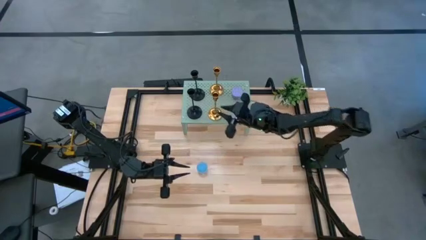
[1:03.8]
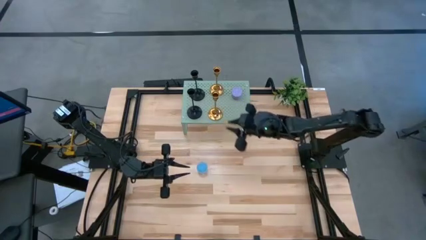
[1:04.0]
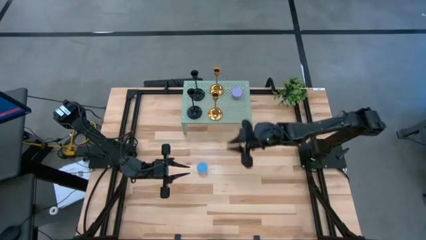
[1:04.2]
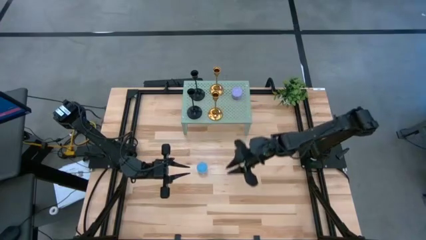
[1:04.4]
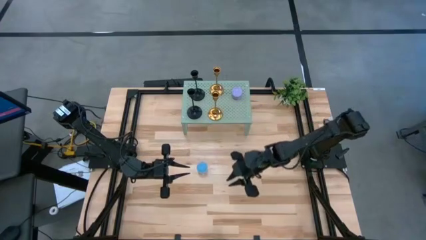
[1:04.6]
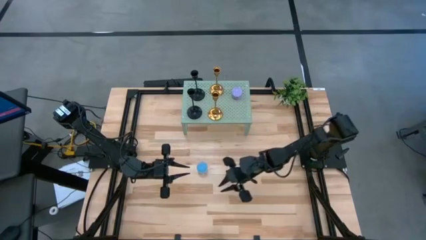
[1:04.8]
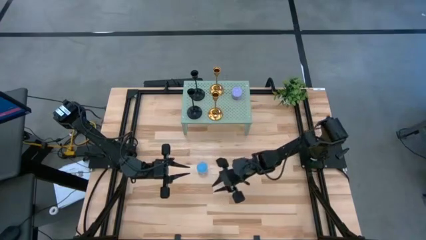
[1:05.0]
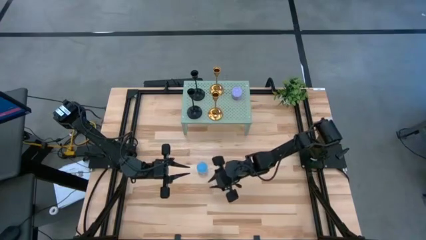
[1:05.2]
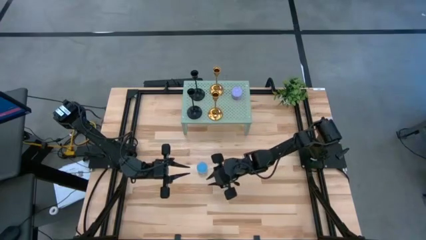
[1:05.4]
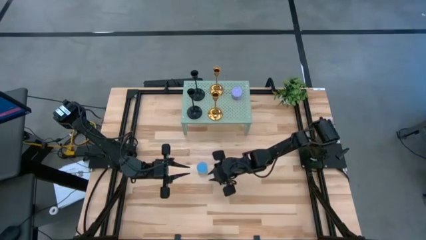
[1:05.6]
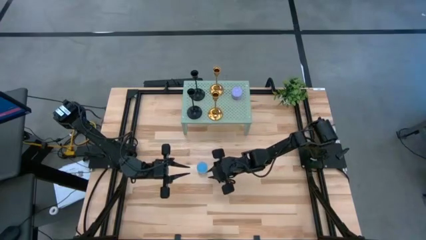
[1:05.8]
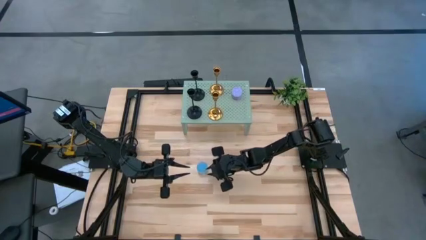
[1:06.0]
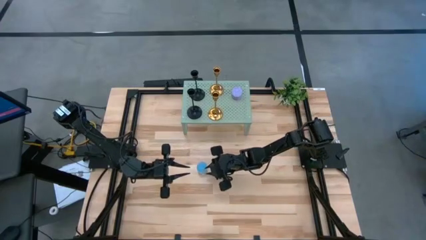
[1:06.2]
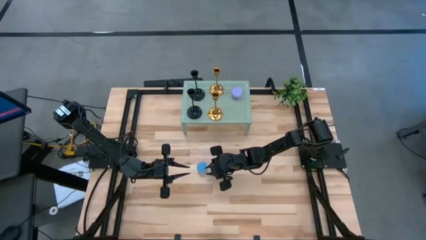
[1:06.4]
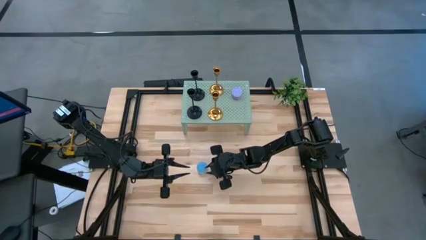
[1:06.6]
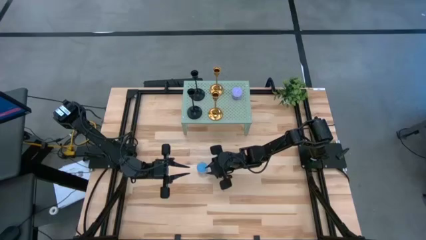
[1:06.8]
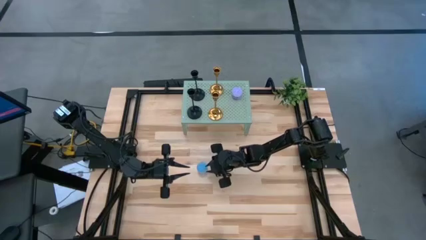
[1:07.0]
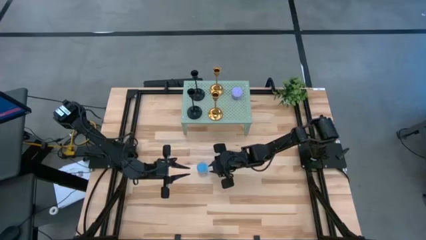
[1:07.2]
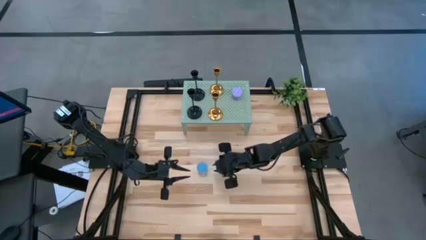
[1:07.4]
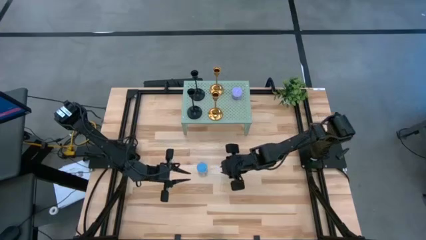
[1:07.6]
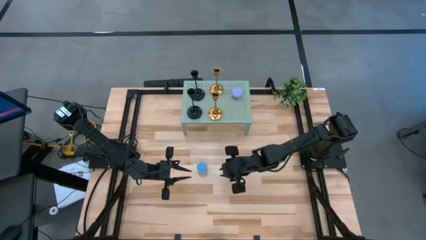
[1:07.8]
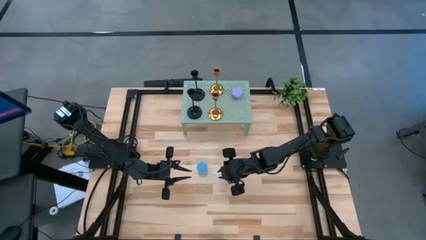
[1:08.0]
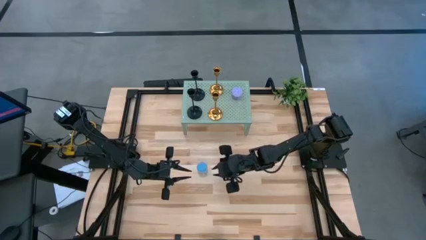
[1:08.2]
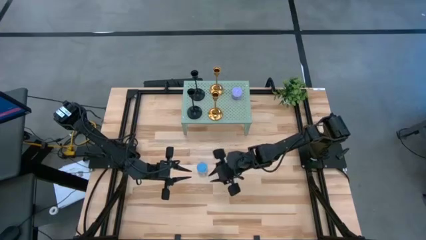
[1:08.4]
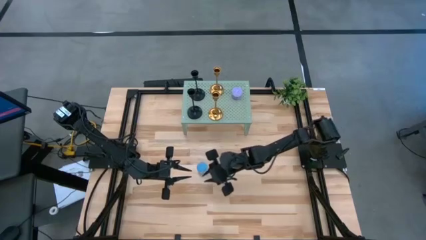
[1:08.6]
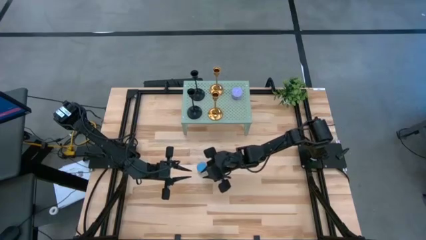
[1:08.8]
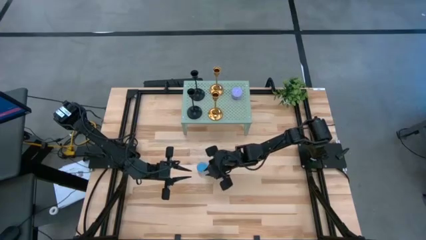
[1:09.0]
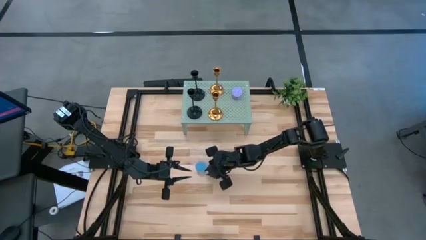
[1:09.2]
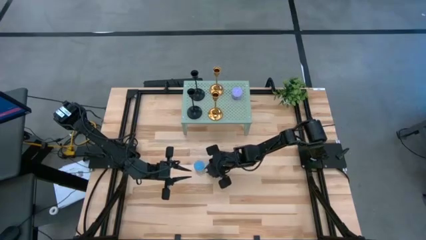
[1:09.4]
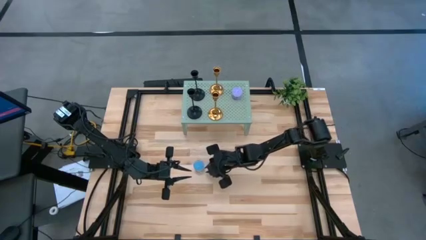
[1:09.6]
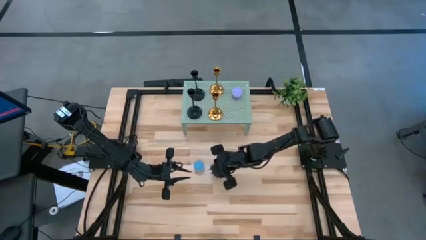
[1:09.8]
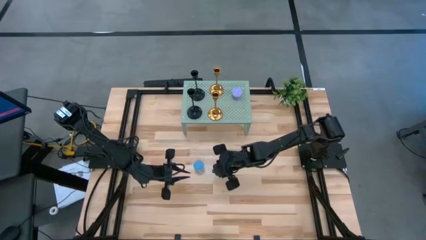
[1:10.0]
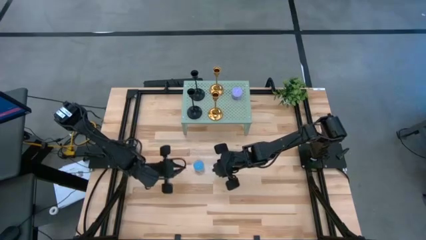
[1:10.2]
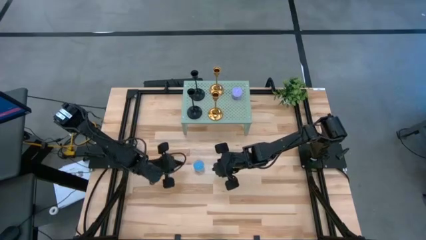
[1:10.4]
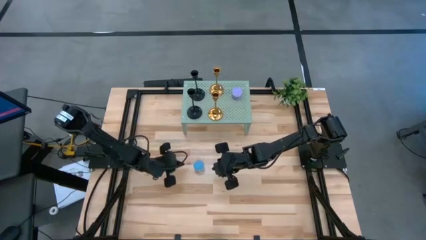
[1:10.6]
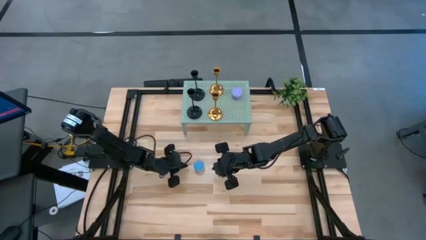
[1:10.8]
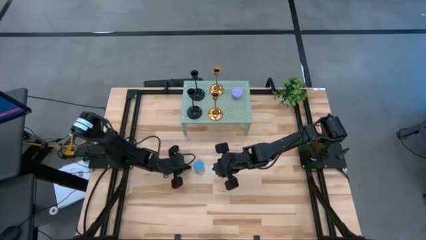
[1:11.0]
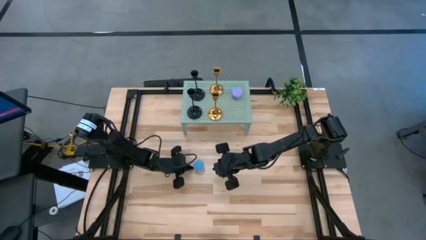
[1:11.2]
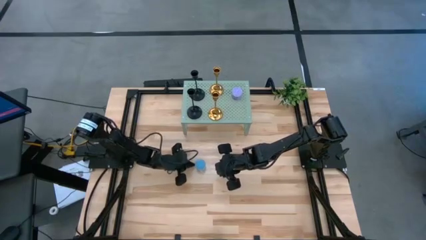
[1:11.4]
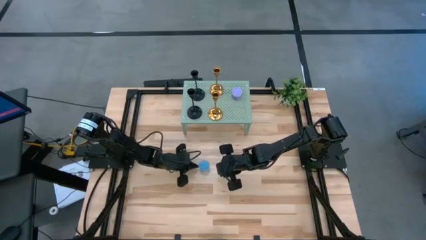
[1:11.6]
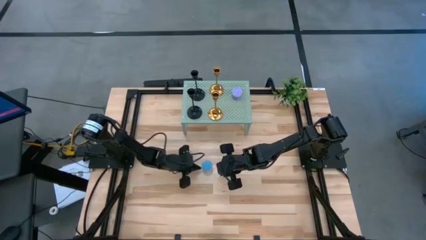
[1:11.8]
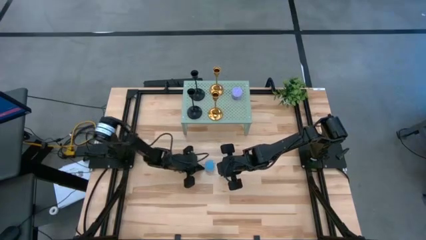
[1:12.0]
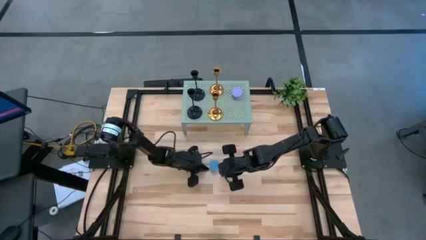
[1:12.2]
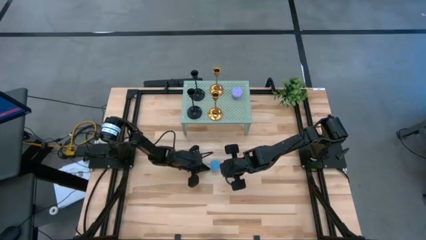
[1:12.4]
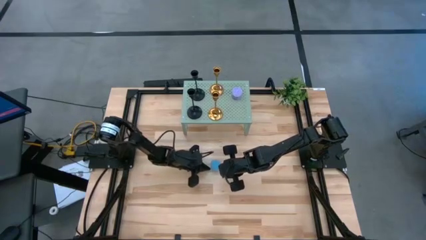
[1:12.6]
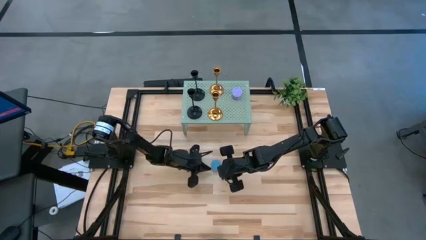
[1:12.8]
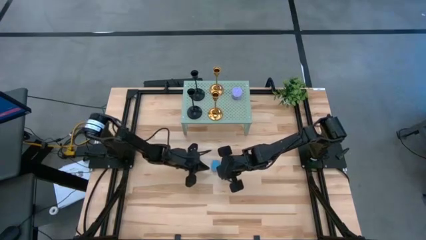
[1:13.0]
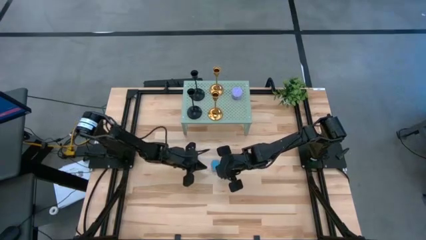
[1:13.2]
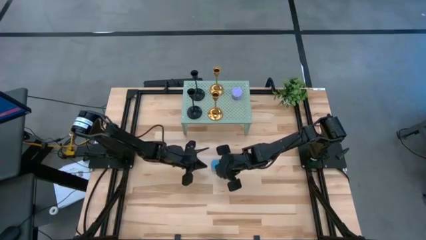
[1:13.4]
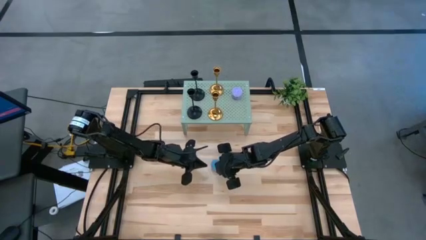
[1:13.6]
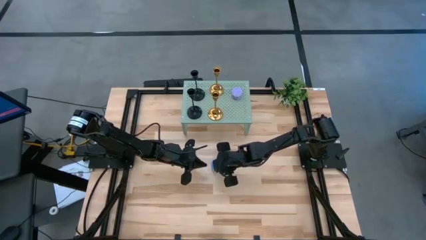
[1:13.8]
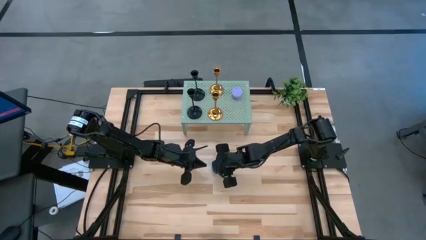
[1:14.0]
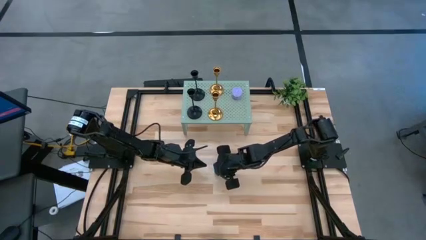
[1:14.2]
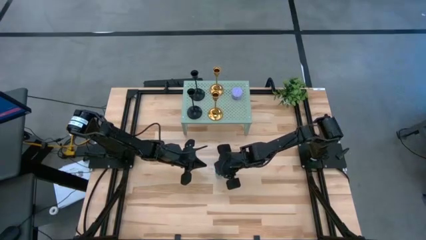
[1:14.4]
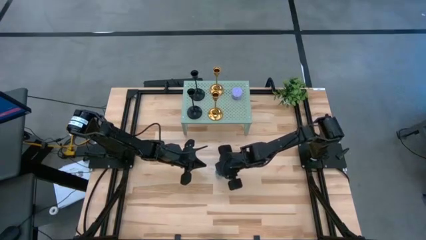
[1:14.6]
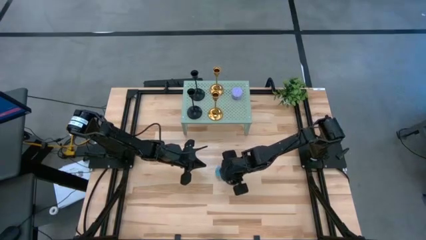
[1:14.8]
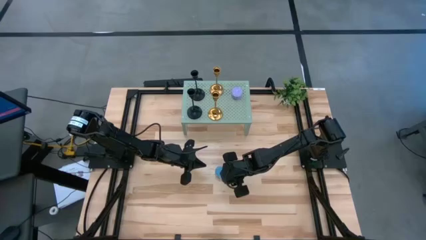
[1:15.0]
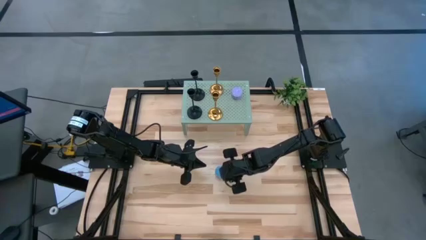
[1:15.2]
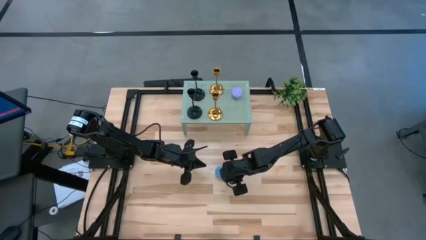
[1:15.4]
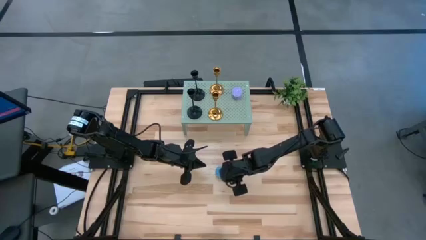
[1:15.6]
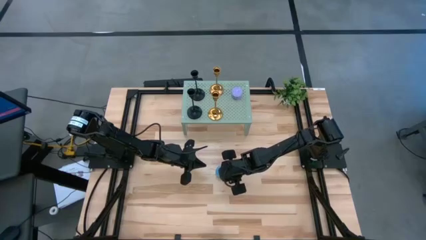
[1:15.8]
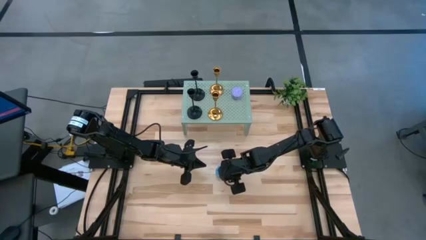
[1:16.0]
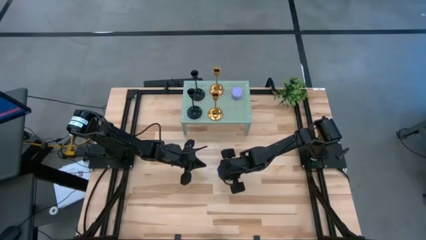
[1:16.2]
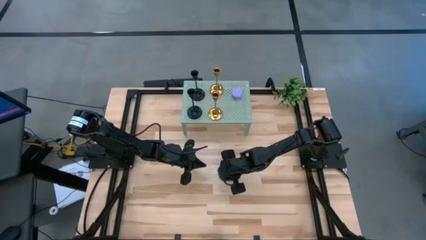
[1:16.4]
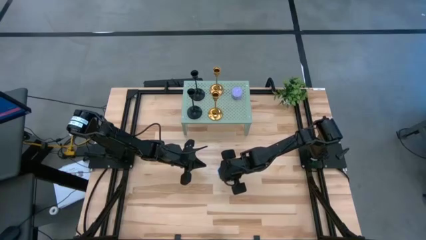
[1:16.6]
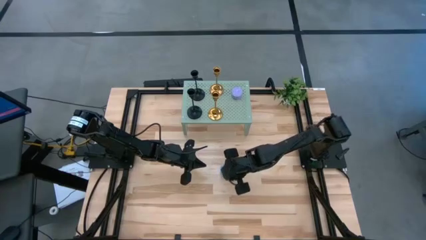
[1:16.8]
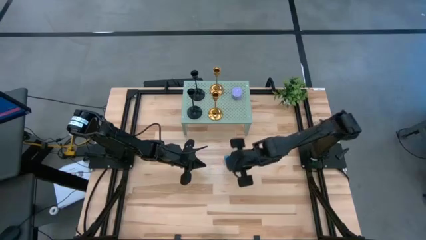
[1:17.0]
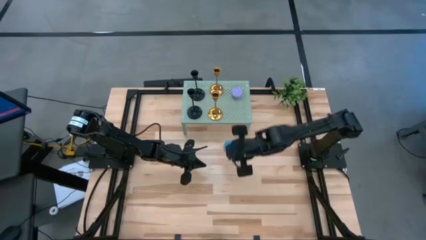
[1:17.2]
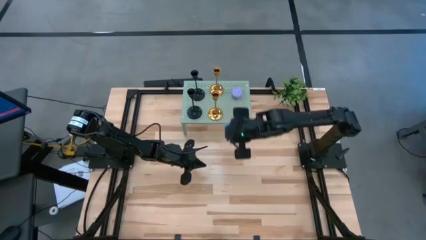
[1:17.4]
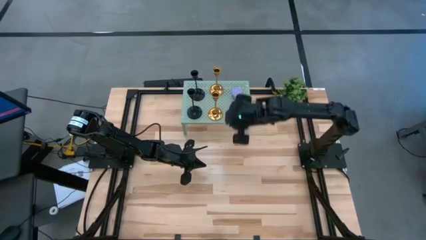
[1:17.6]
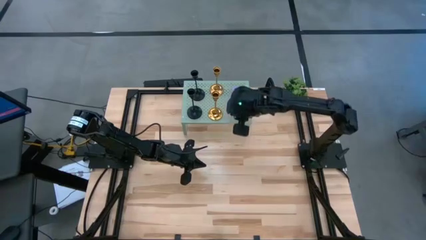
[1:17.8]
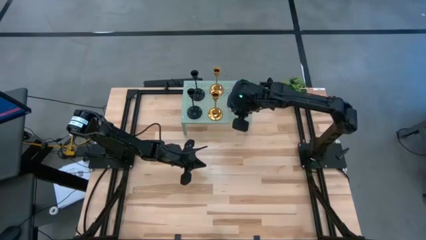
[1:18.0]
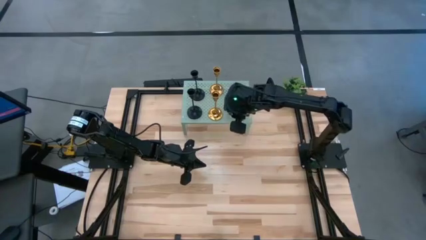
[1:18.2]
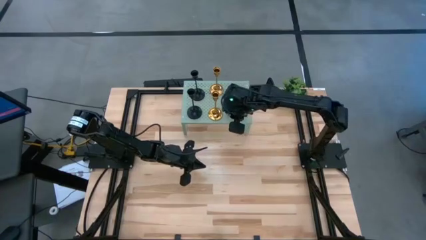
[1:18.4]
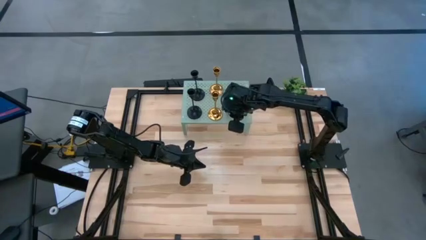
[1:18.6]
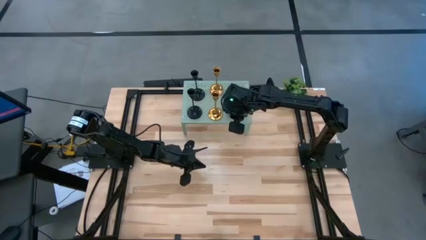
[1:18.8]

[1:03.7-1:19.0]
Task: Pick & Place candle stick holders
Put the blue scented candle on the shelf aligned with the purple scented candle

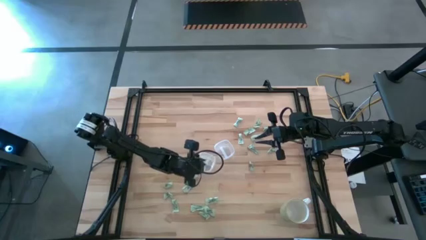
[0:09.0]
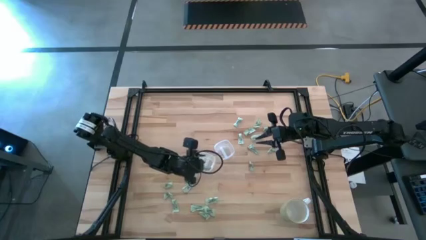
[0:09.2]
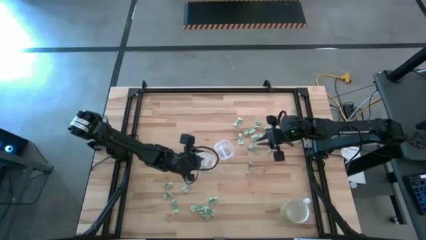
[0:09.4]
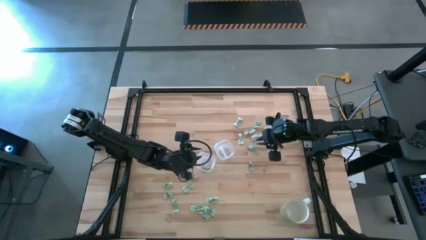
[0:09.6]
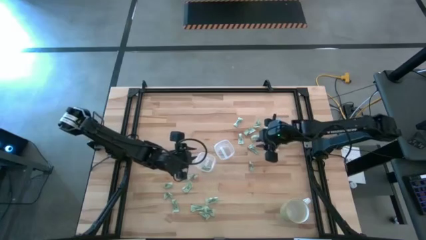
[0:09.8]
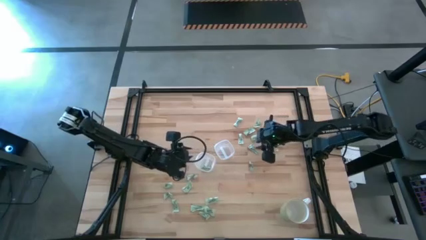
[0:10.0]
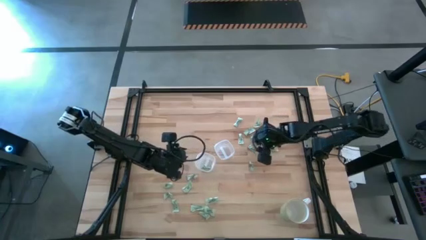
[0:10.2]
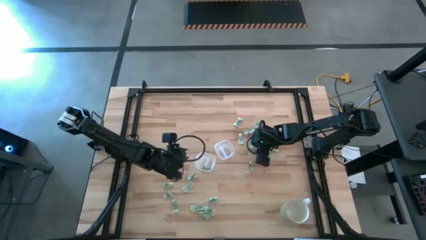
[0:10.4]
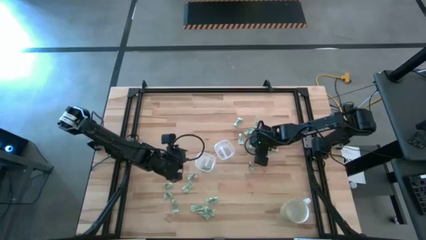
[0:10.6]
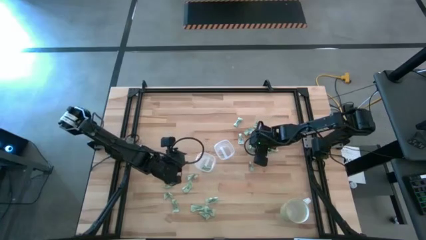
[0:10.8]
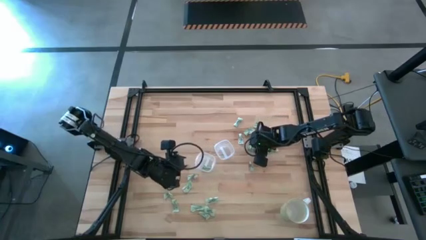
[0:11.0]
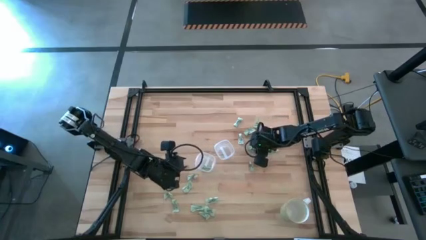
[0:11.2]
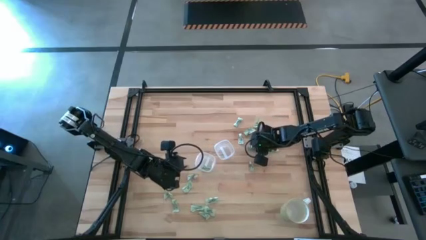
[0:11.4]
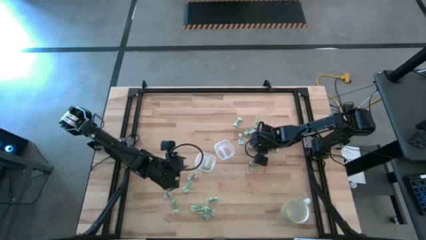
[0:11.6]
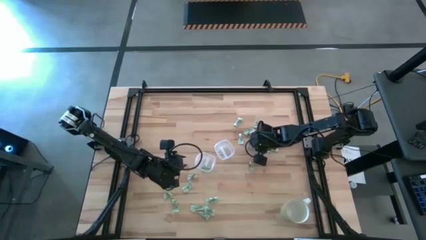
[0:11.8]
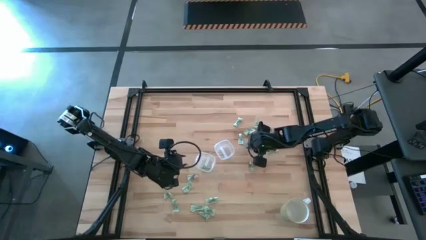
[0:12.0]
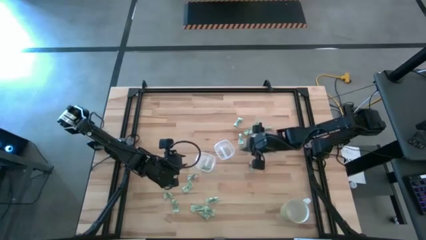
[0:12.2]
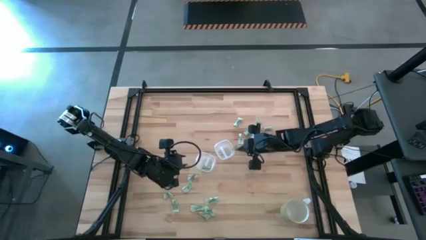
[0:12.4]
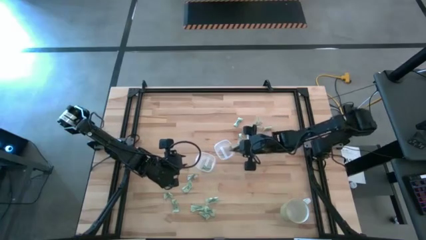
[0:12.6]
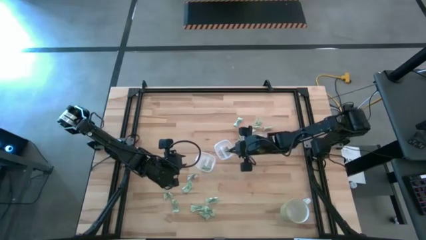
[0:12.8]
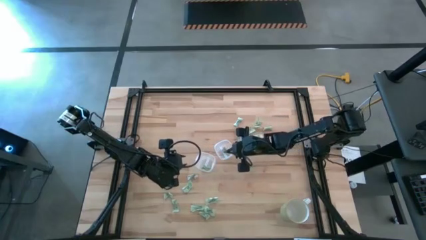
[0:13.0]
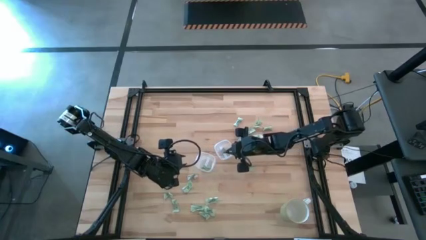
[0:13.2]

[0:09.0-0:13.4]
Task: Pick and place items into bin
Put the stevia packet into the right bin
